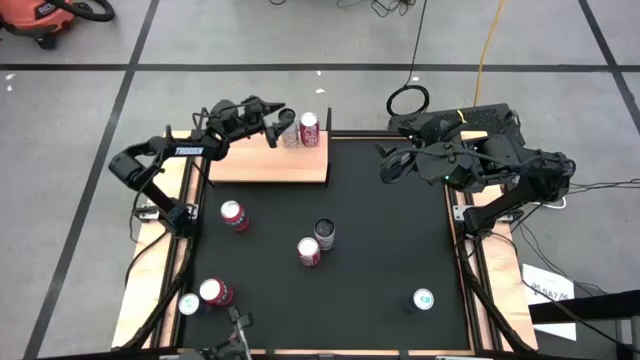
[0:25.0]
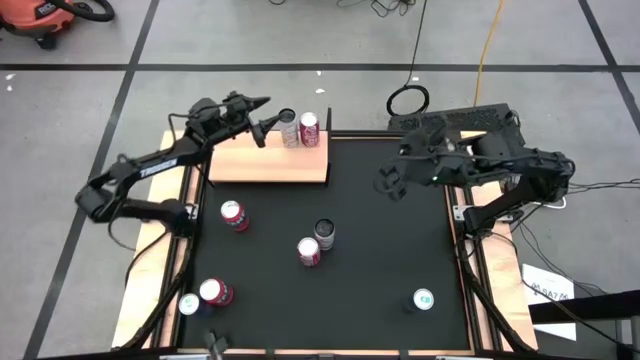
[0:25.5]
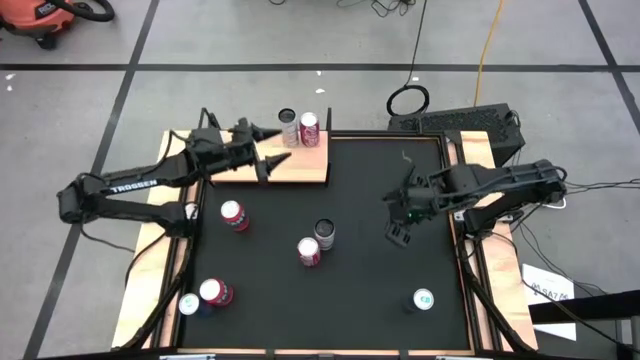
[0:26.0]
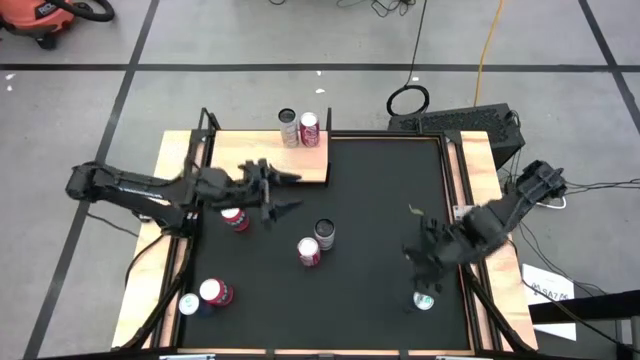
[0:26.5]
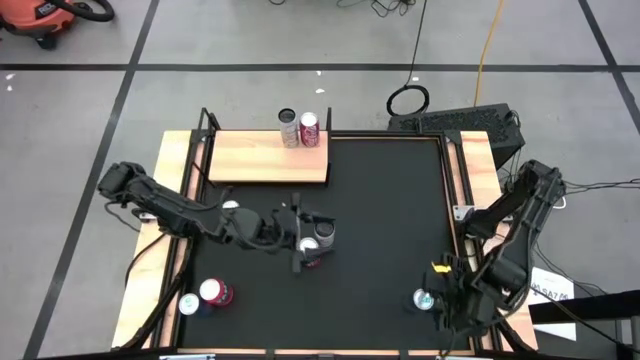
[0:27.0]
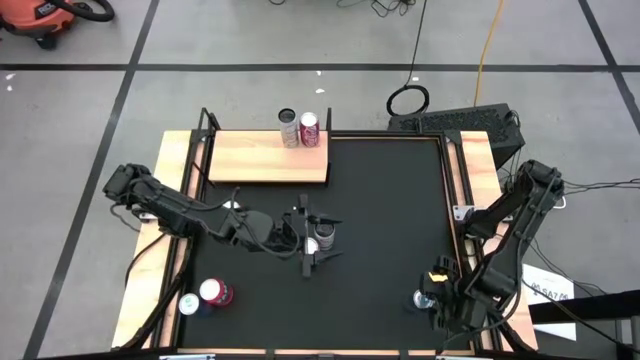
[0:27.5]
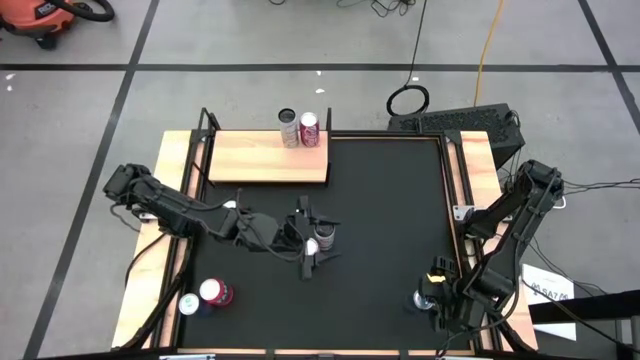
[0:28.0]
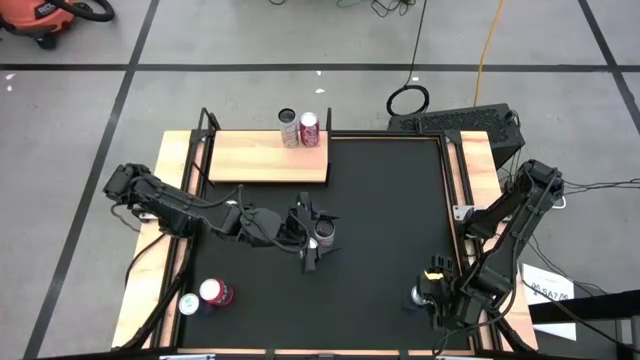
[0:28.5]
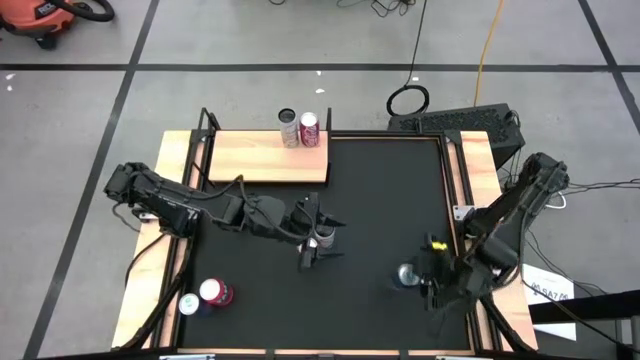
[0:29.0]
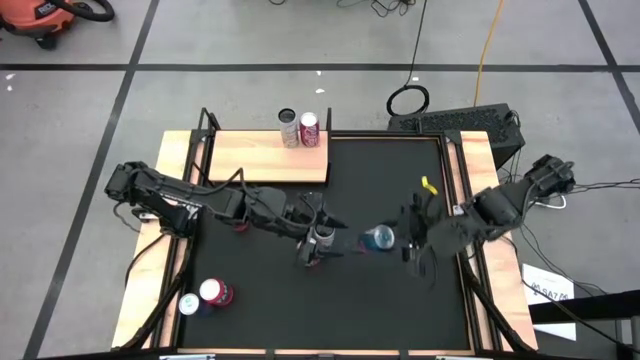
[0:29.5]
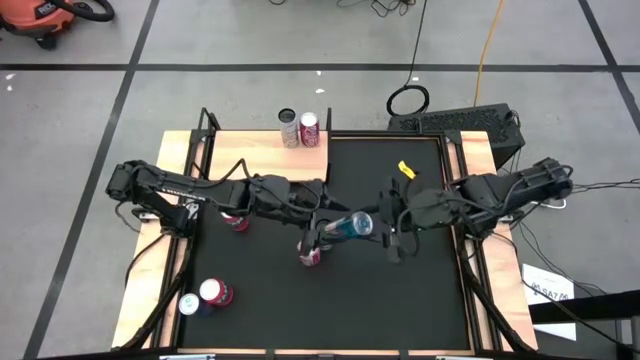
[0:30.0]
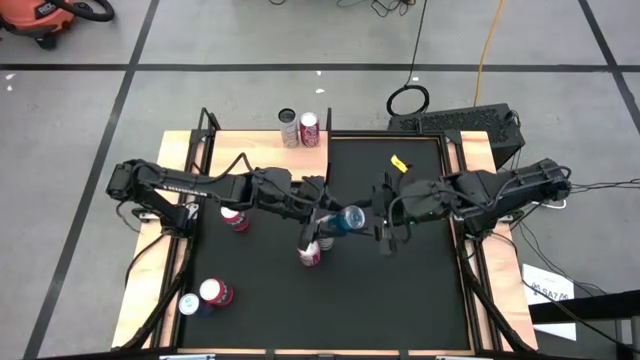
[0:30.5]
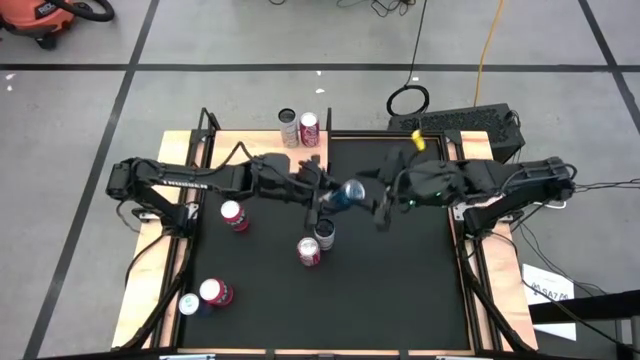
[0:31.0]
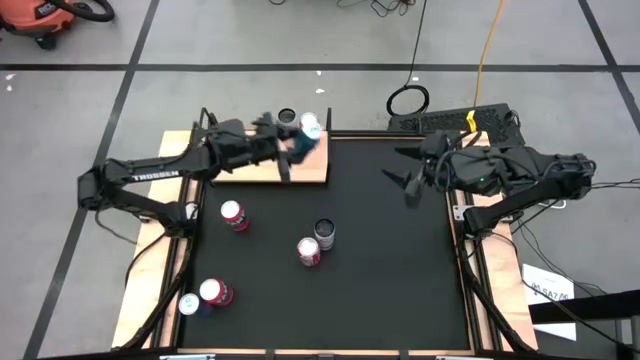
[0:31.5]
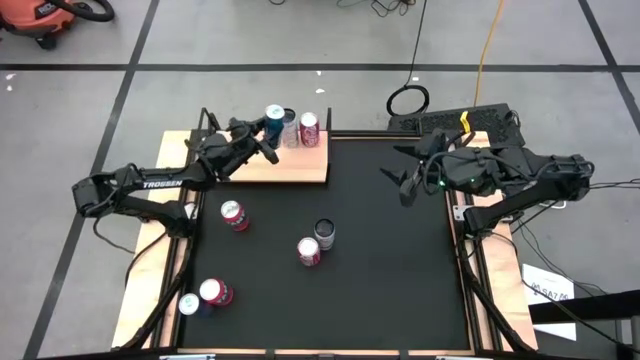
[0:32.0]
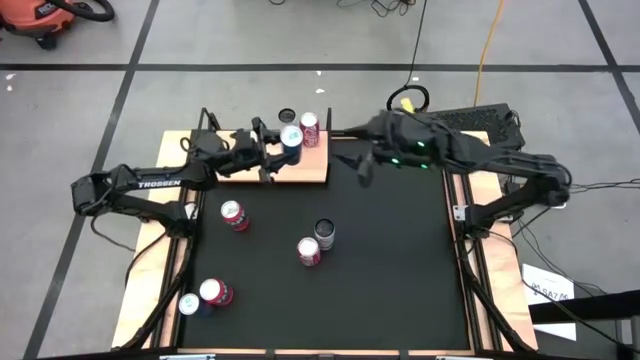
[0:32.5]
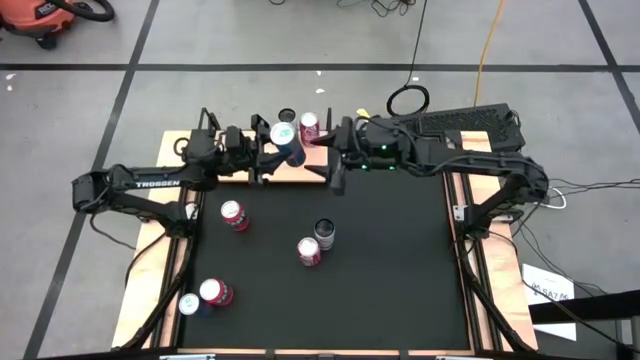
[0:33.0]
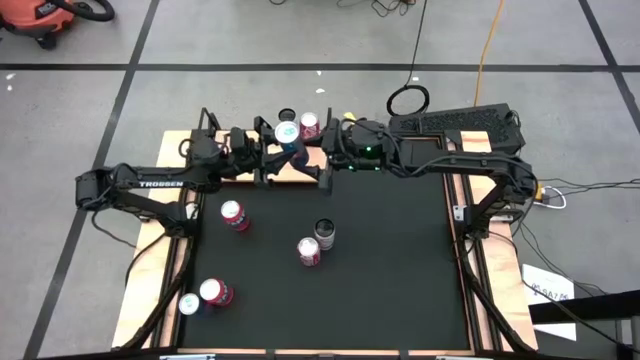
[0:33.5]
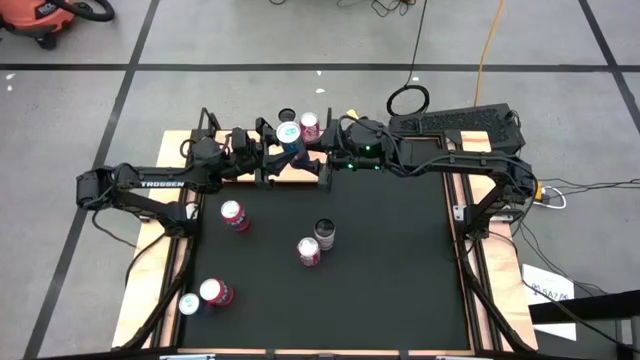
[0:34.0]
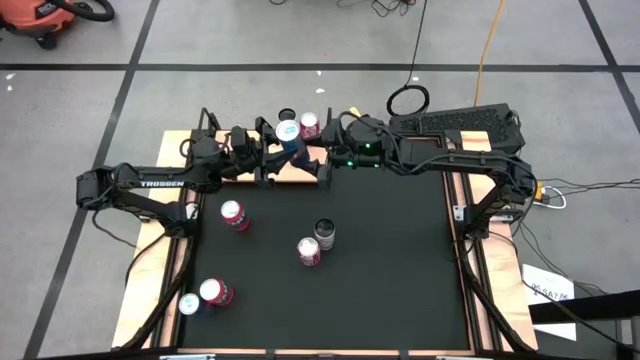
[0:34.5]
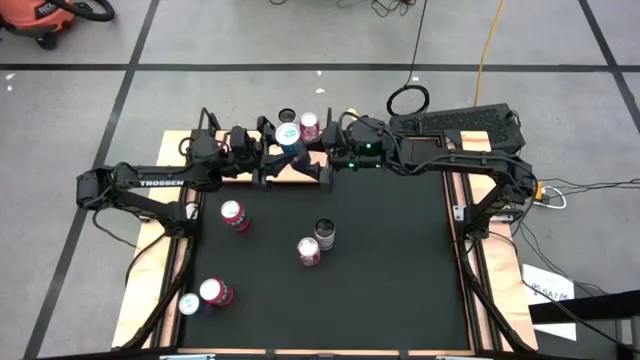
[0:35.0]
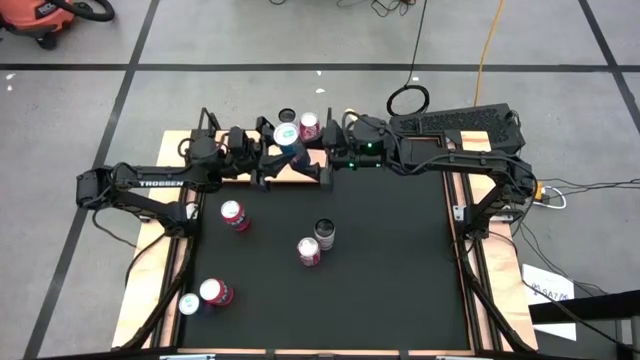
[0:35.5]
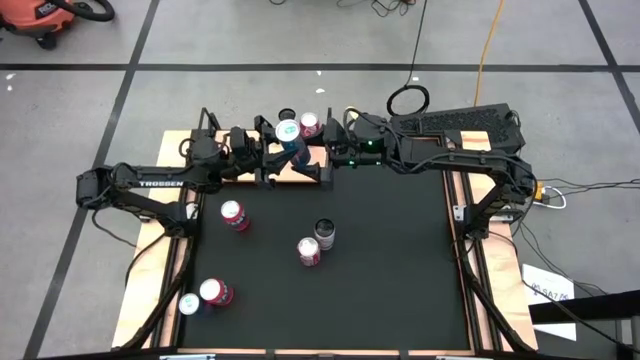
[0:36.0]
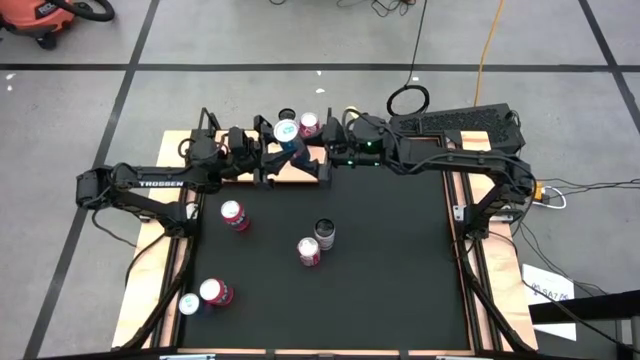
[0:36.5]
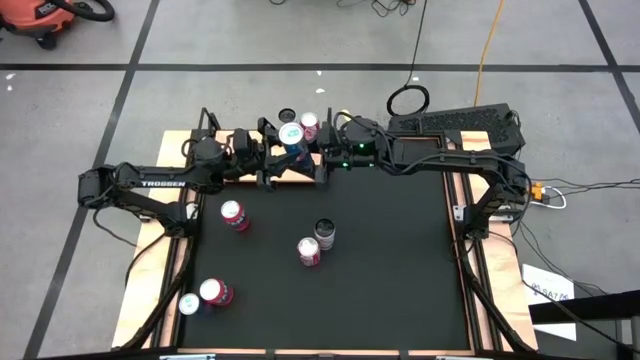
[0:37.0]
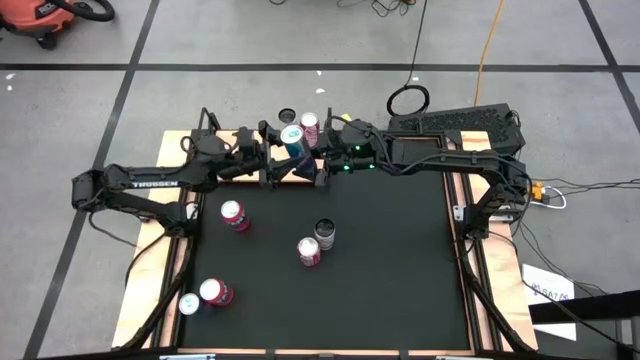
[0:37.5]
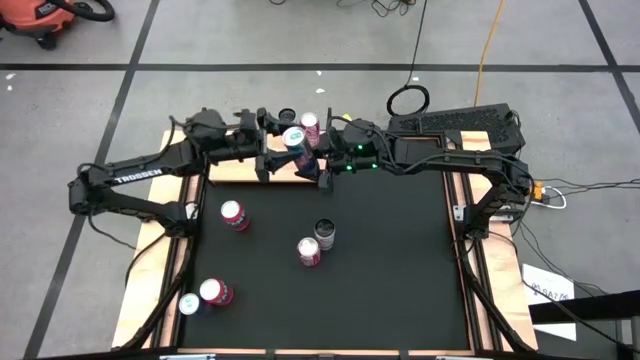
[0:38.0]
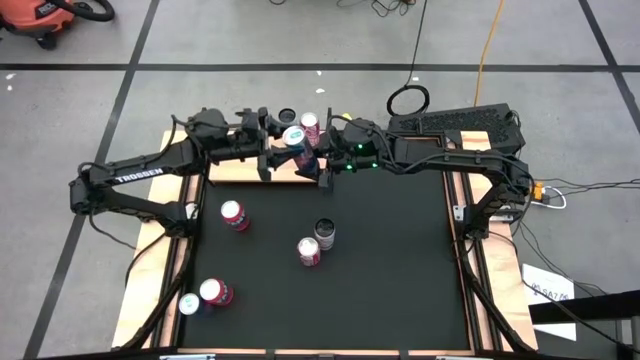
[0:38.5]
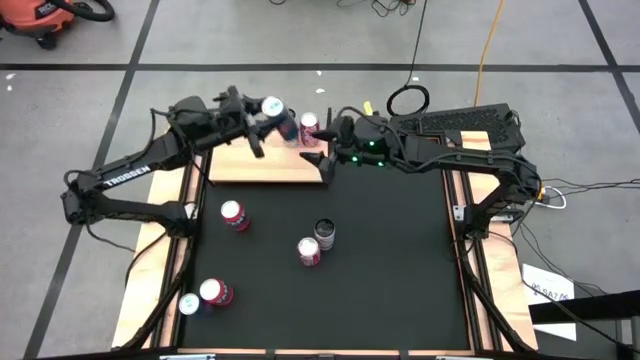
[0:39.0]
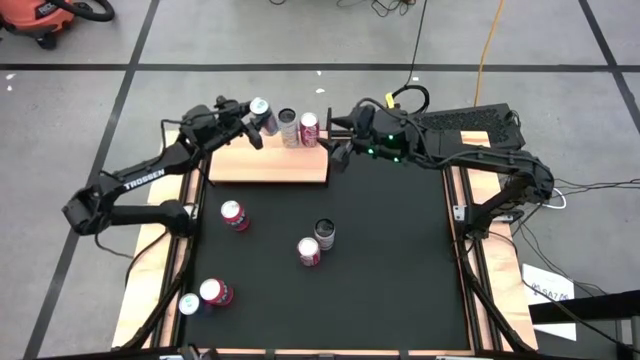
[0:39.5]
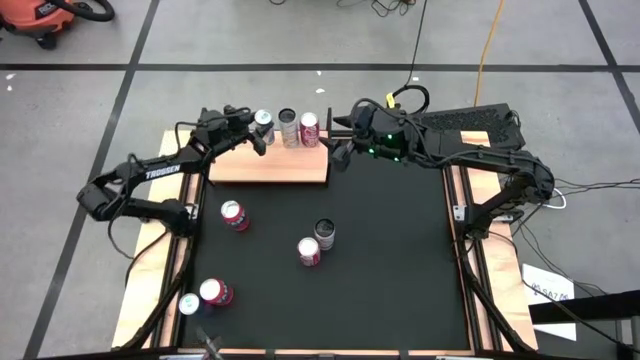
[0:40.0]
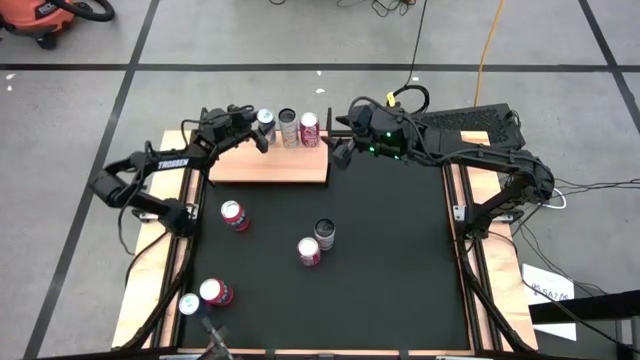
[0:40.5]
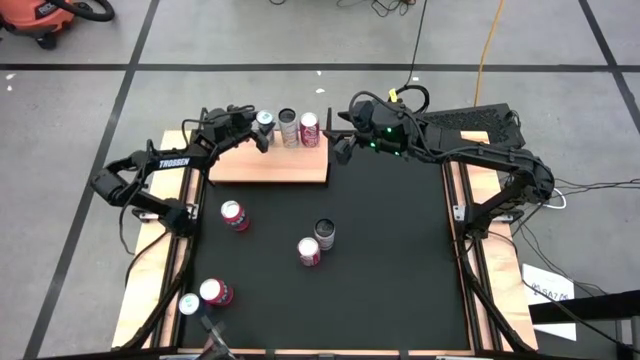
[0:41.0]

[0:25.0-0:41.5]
Task: Place canned beverage on shelf
Put the right blue soda can on the shelf

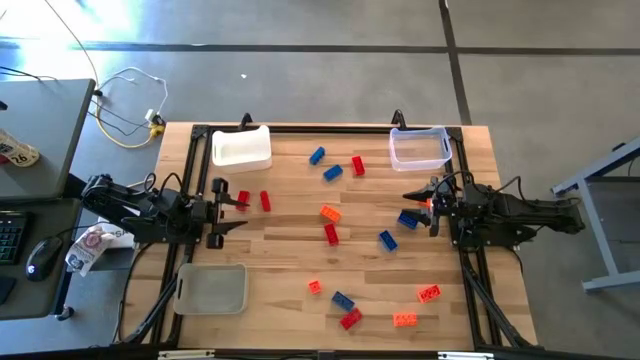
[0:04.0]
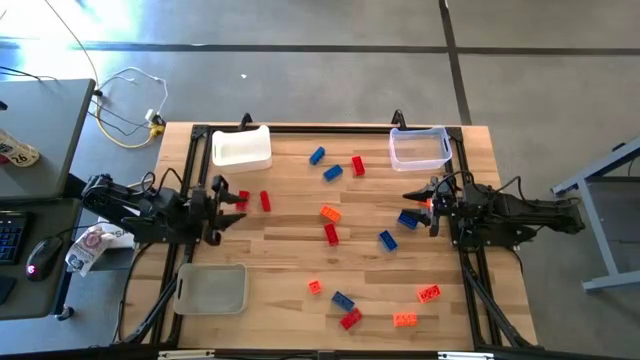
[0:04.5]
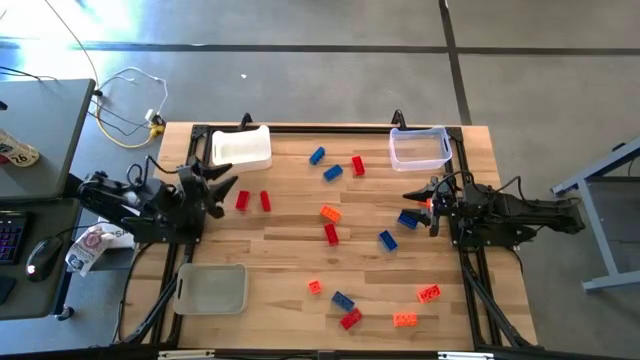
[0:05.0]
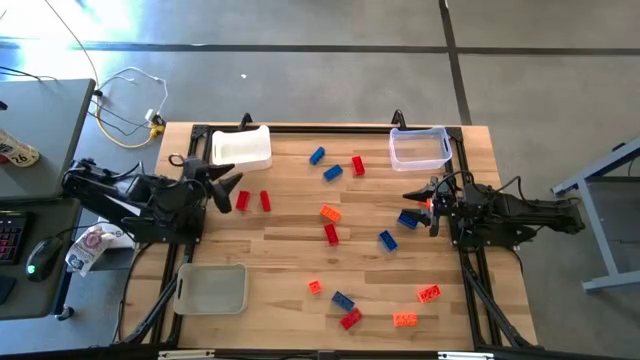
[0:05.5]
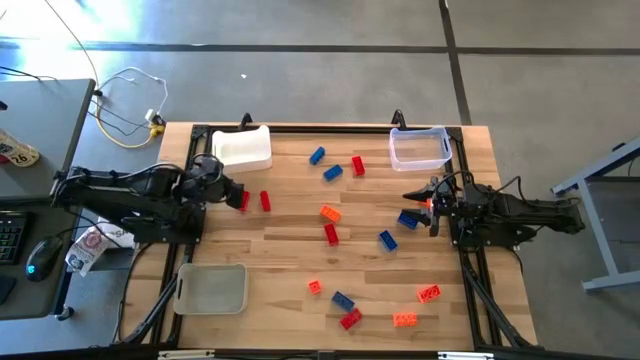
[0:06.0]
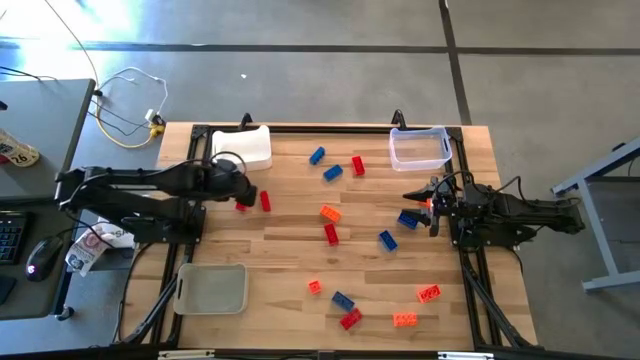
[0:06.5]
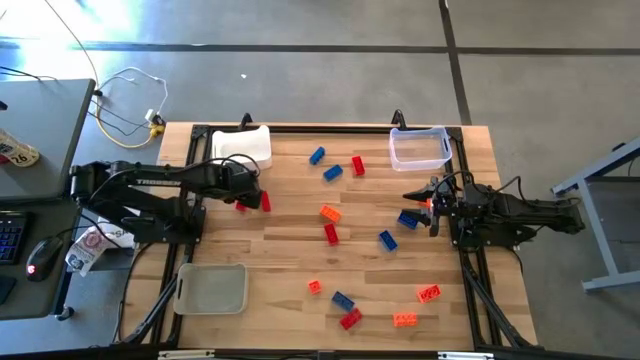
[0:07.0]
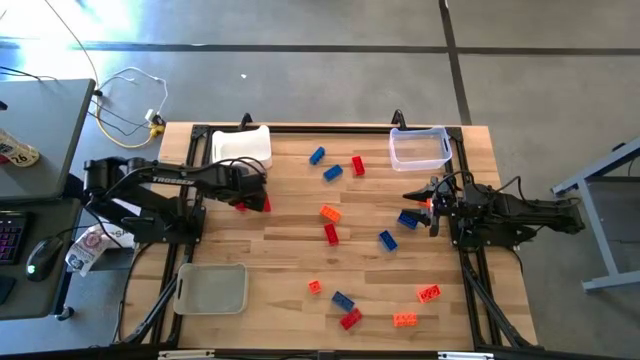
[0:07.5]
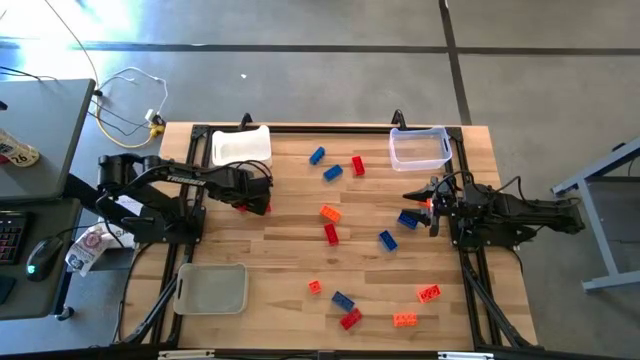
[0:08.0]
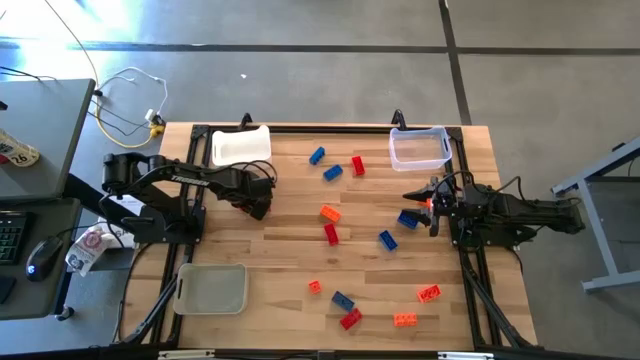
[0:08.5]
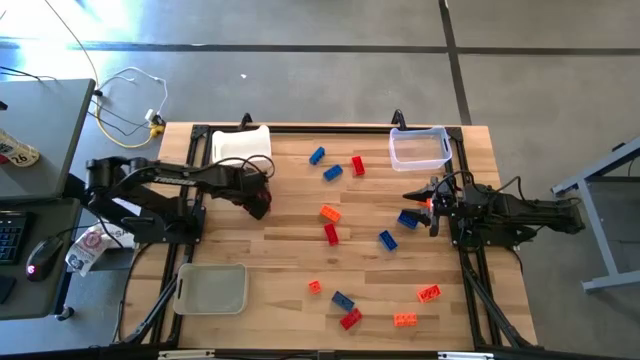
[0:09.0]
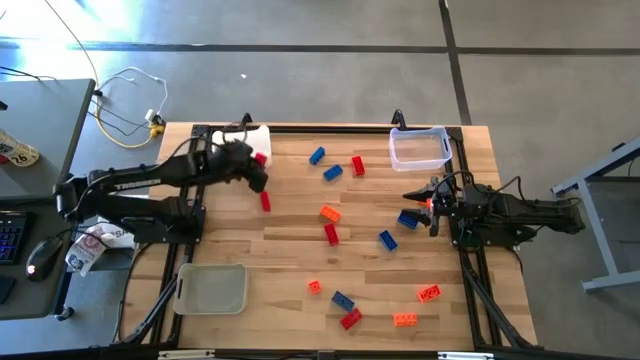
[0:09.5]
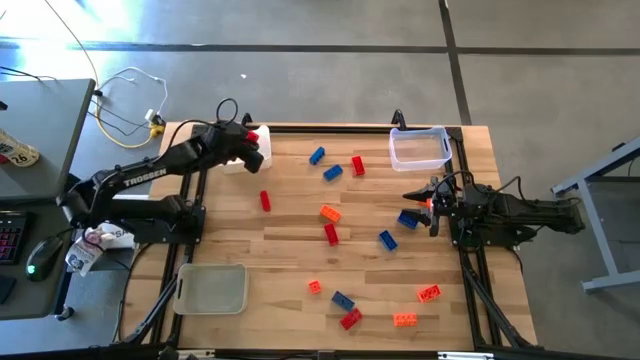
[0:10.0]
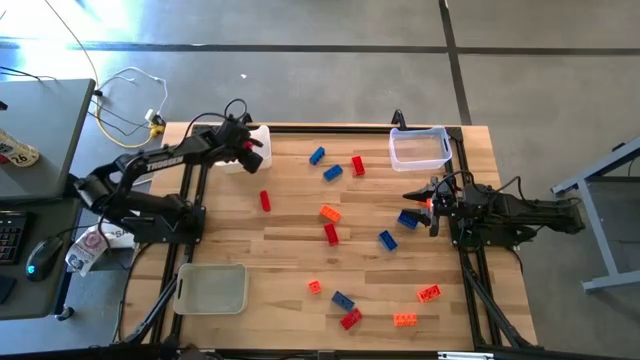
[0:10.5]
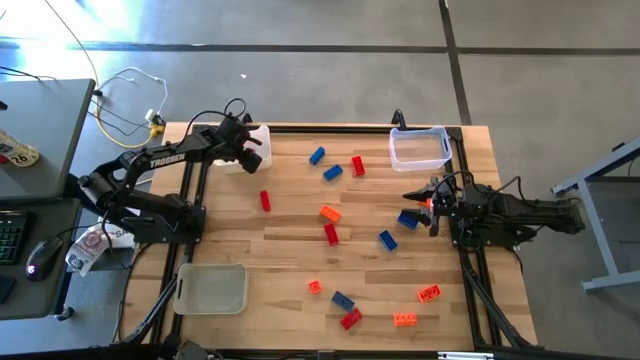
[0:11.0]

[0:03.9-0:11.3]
Task: Sort & place blocks by color
Put the red game piece into the white bin
